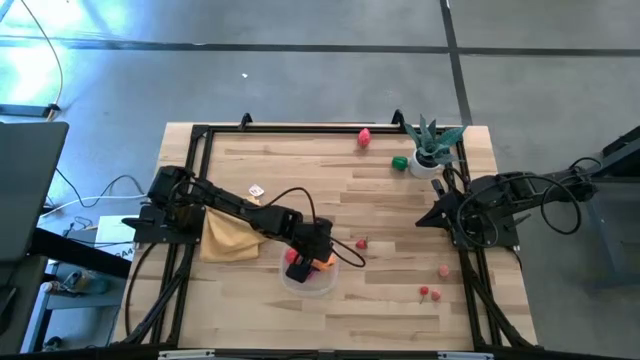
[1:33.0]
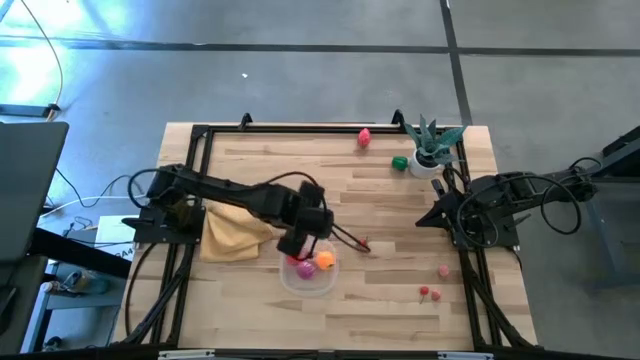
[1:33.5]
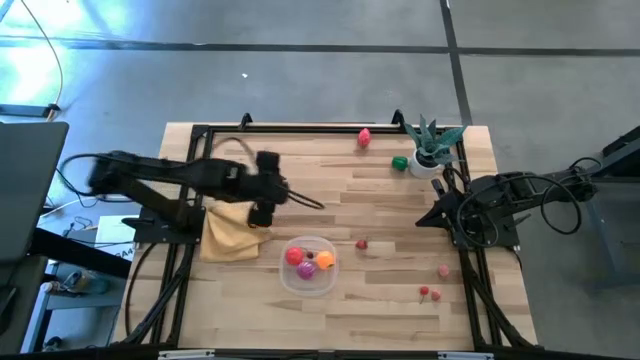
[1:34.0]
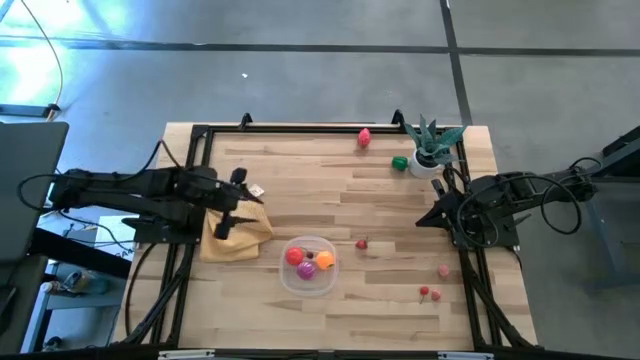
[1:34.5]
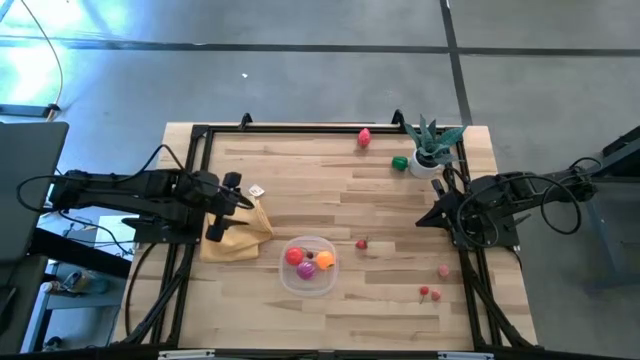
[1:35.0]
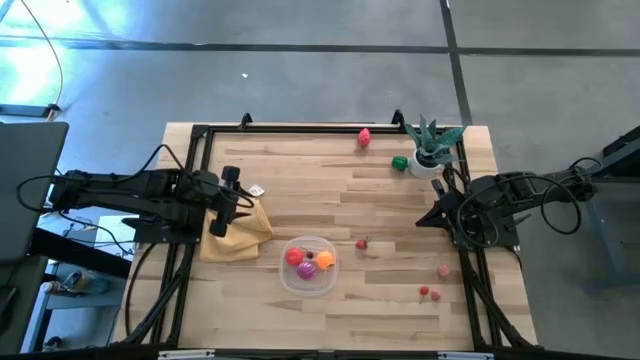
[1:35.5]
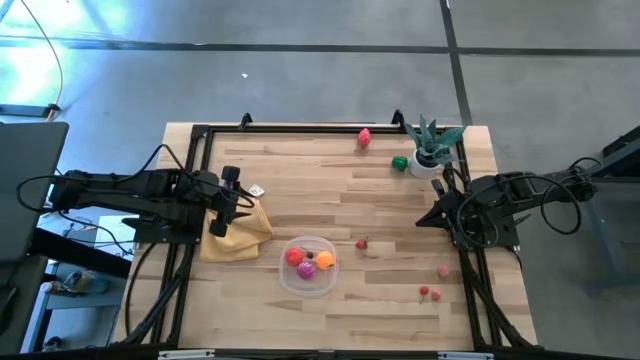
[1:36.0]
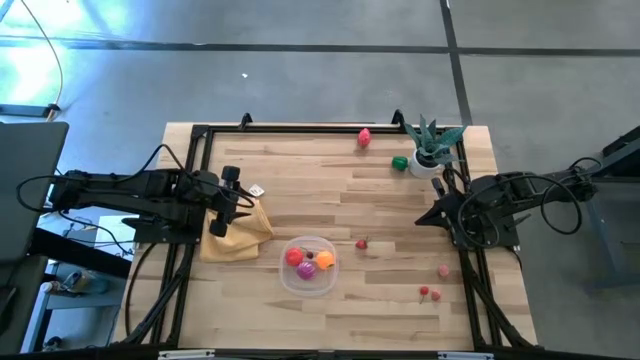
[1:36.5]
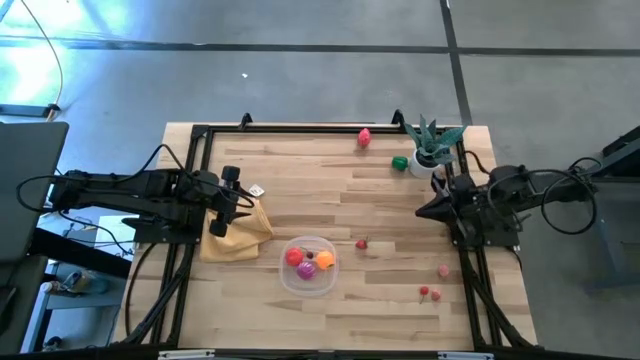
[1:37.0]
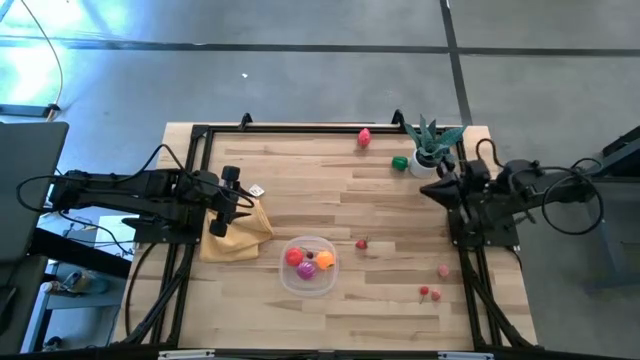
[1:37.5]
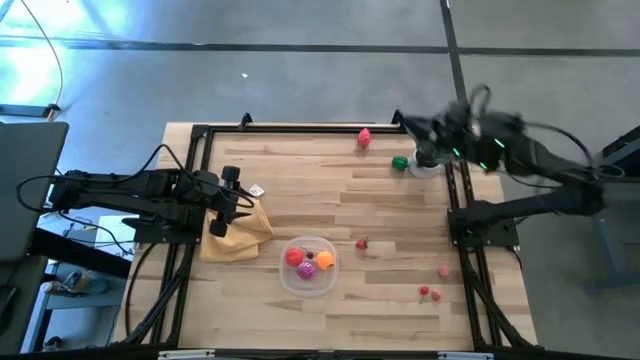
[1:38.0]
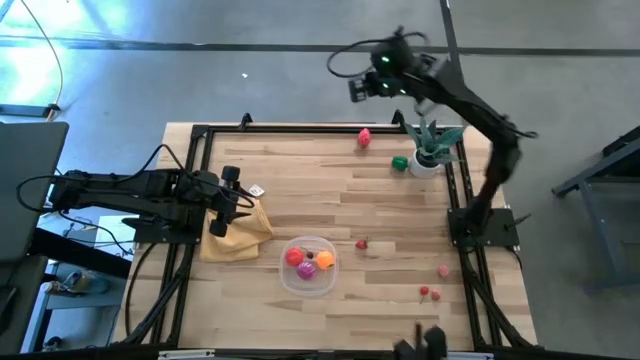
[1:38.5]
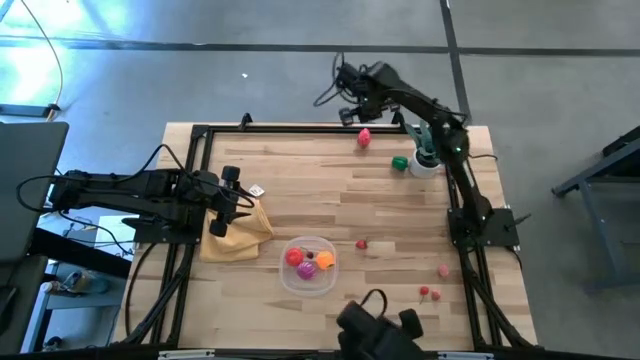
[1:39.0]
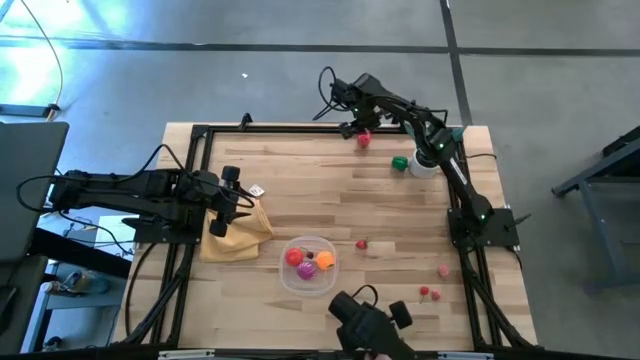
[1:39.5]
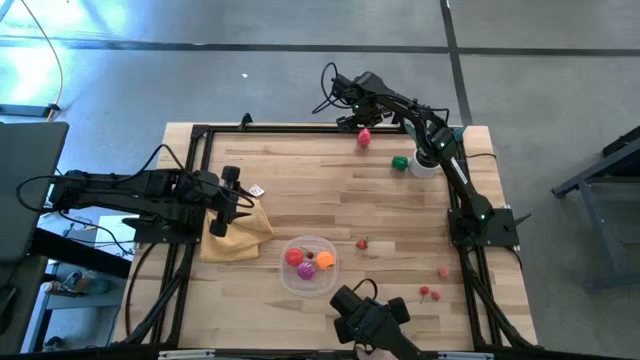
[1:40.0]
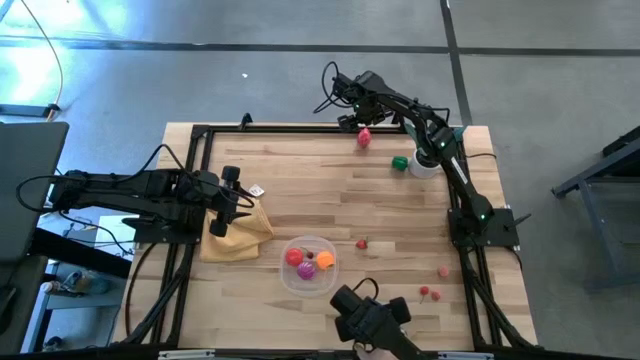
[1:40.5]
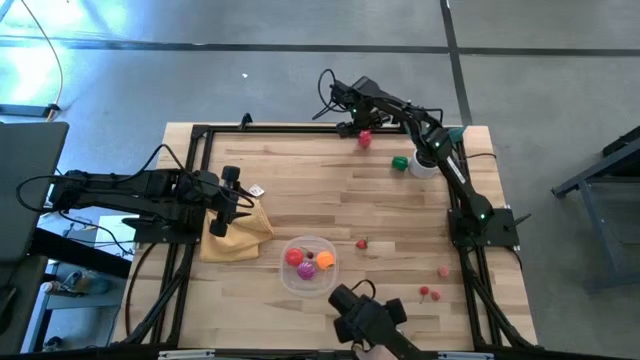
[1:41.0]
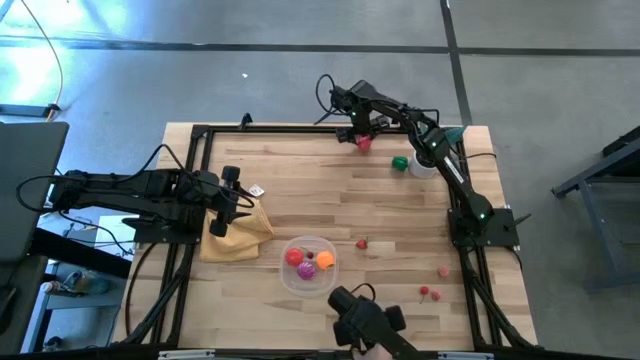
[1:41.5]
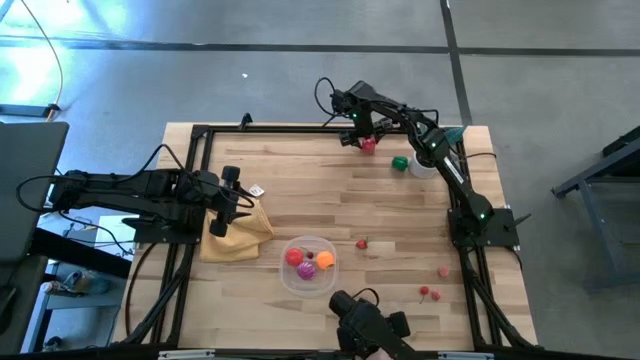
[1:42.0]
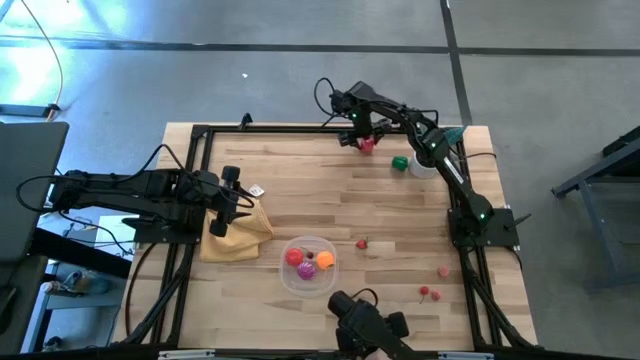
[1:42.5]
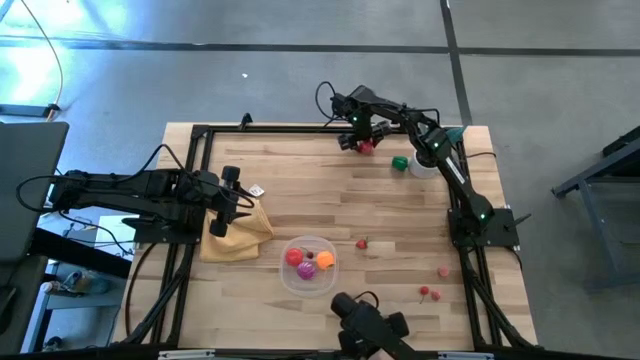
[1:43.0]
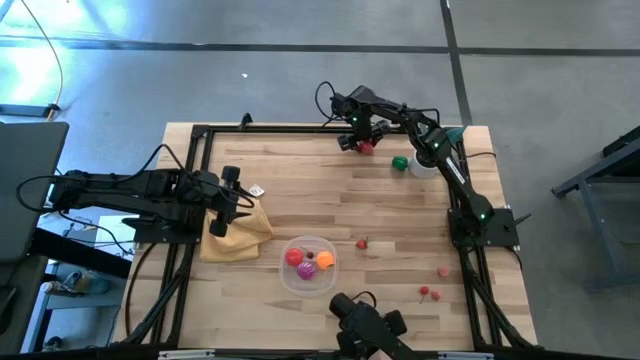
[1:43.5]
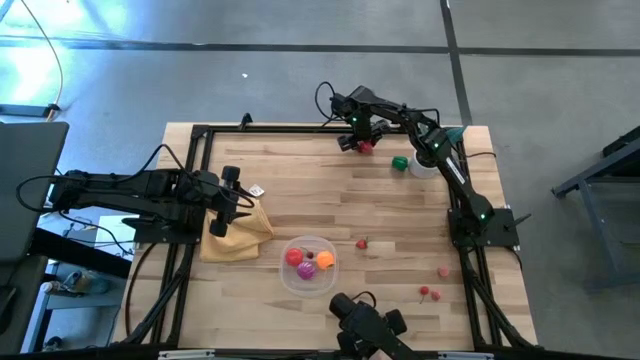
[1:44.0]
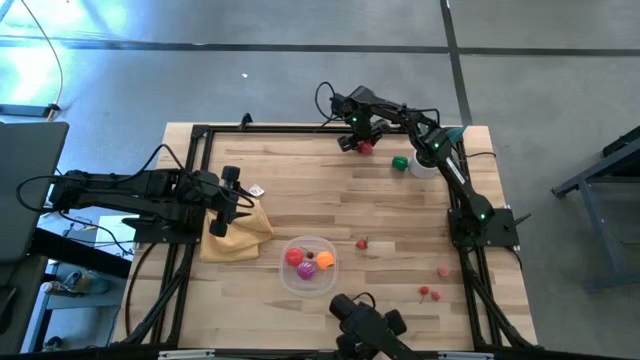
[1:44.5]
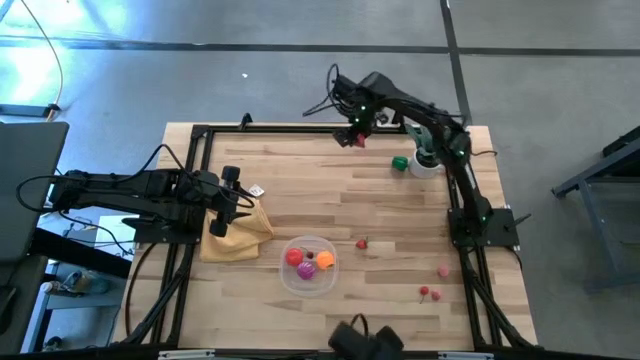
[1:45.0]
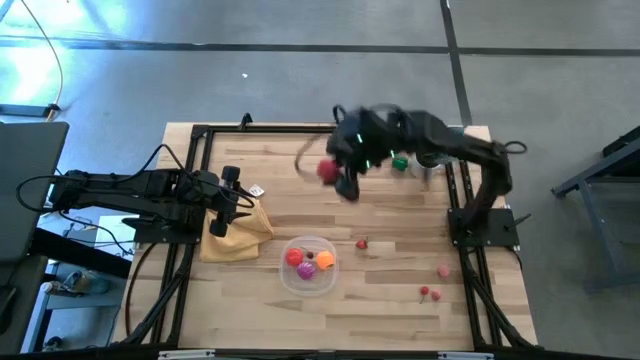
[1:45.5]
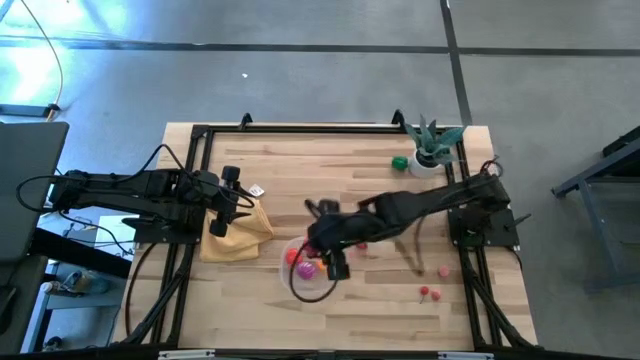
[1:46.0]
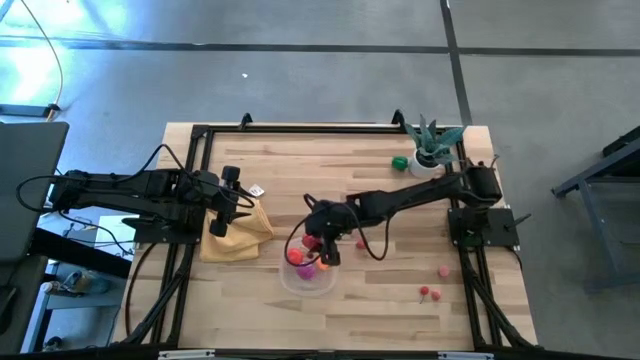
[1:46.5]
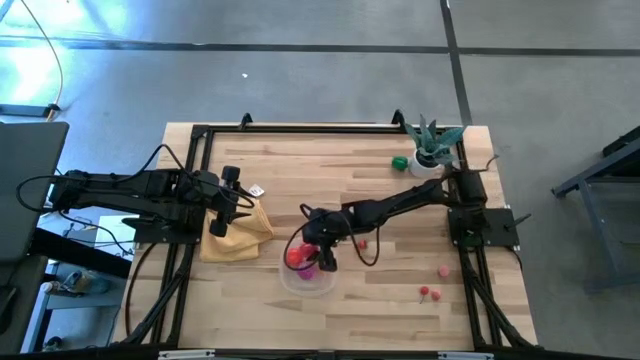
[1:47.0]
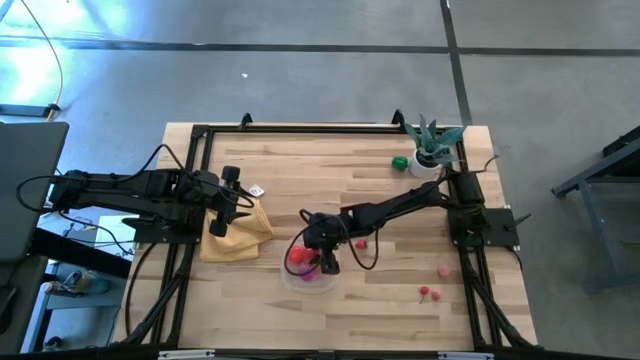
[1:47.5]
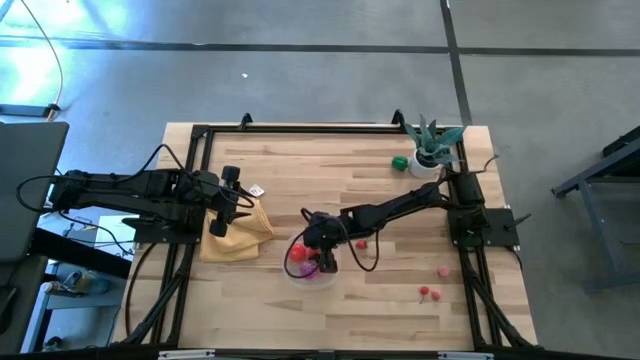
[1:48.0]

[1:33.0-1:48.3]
Task: Pick and placing Produce into tupperware
Put the red dragon fruit into the transparent bin

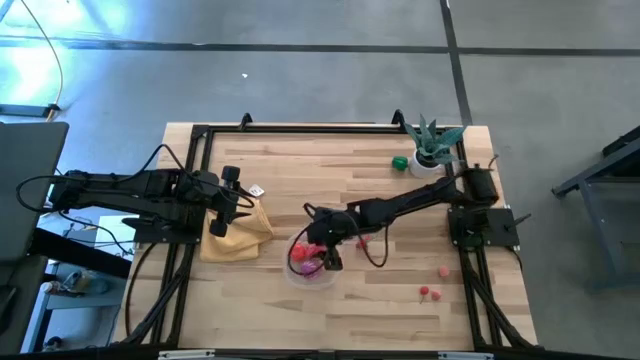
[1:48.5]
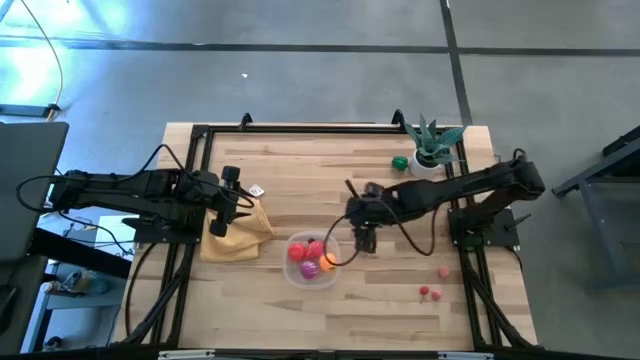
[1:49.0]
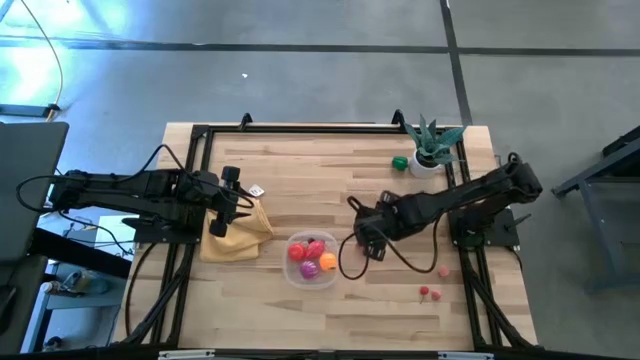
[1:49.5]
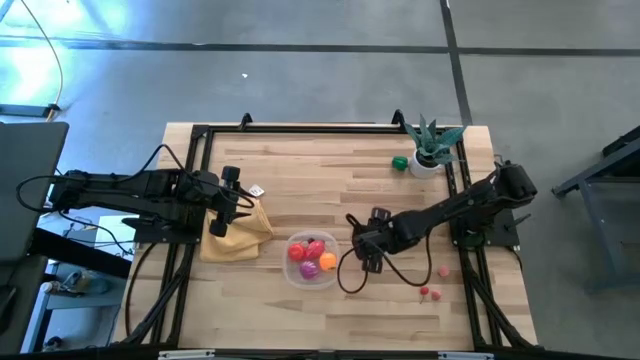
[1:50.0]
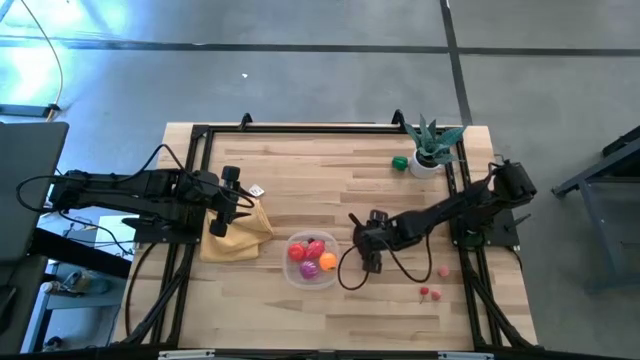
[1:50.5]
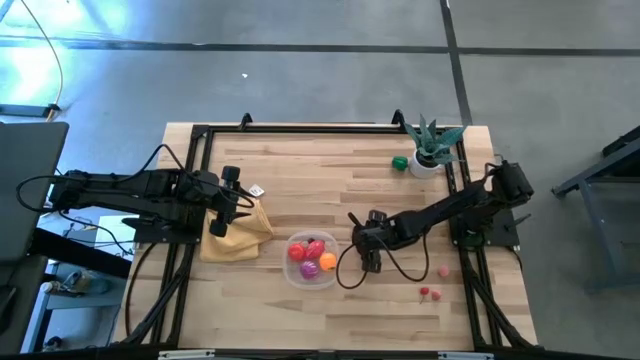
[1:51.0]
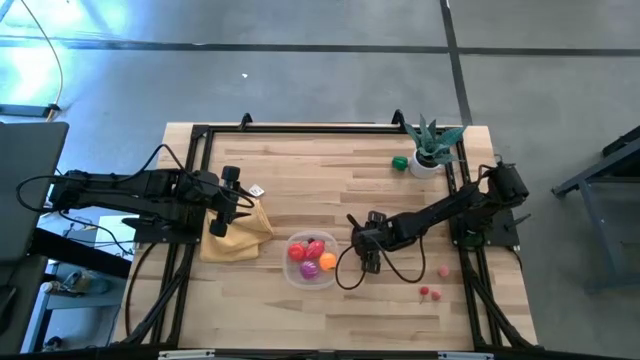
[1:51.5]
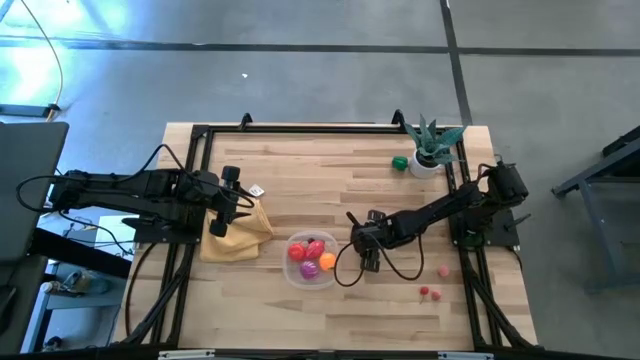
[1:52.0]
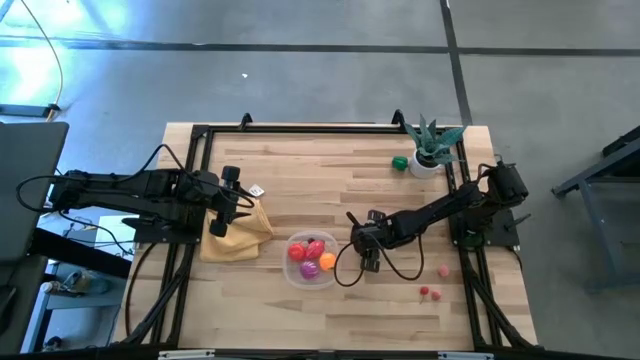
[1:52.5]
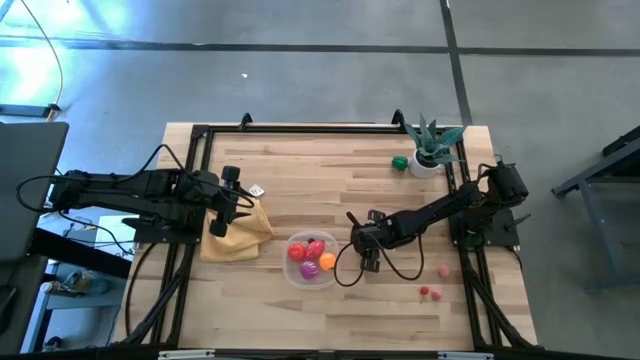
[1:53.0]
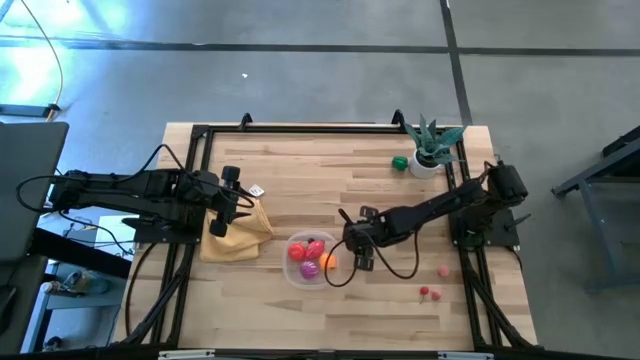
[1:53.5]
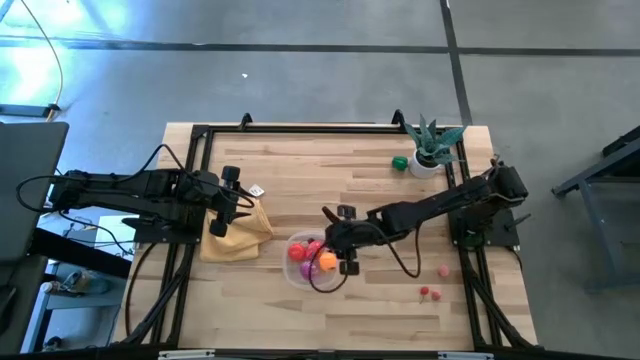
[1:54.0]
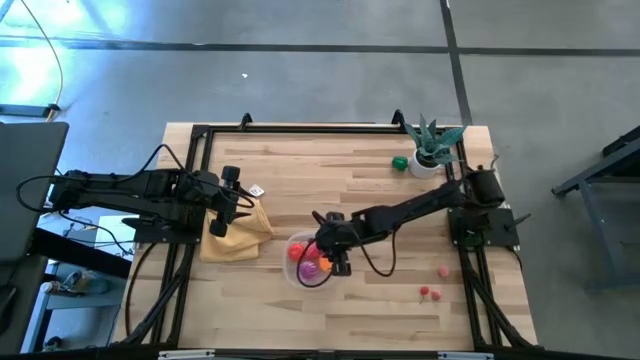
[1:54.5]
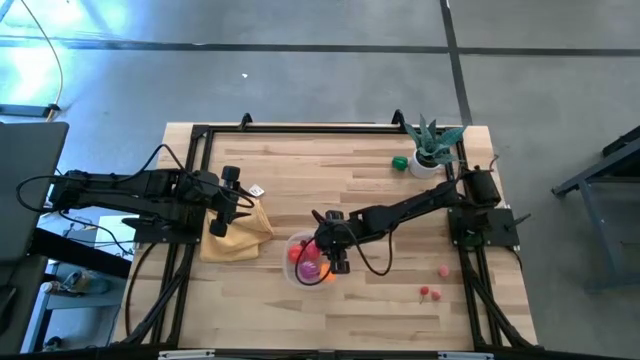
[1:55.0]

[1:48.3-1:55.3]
Put the red strawberry into the transparent bin
